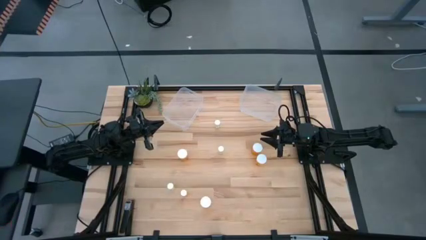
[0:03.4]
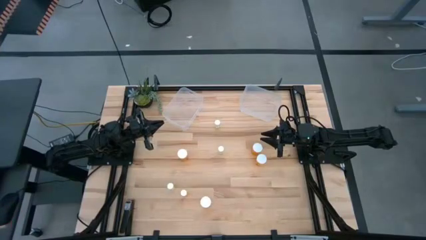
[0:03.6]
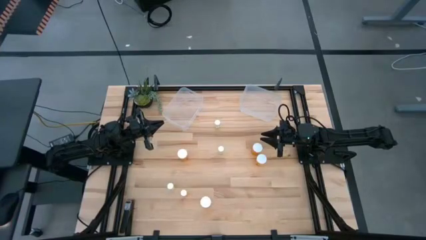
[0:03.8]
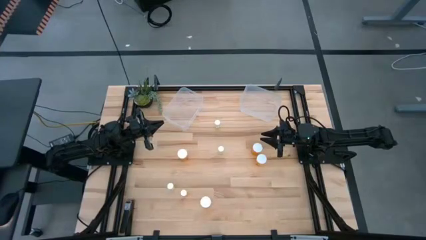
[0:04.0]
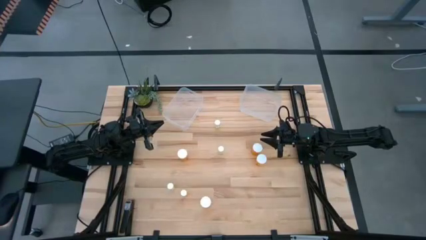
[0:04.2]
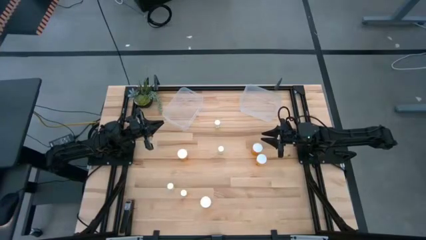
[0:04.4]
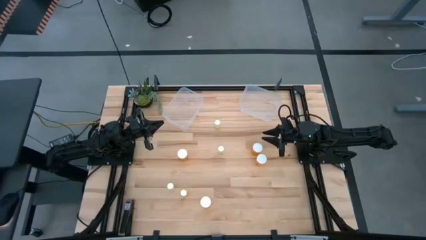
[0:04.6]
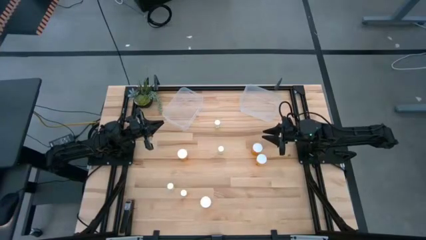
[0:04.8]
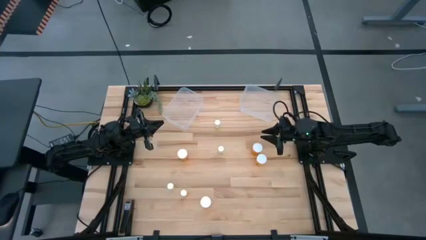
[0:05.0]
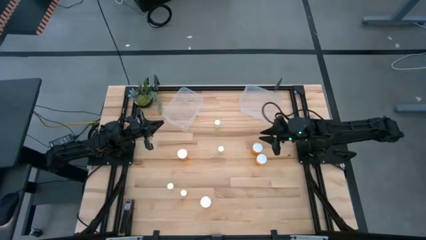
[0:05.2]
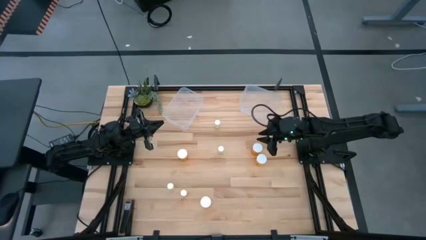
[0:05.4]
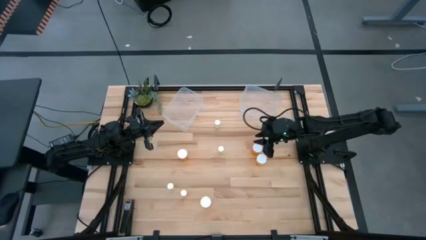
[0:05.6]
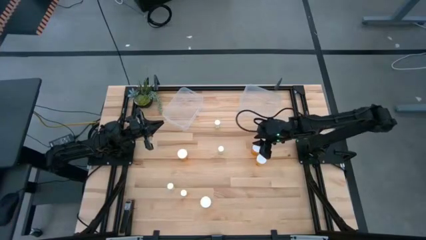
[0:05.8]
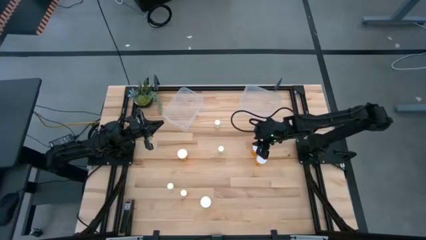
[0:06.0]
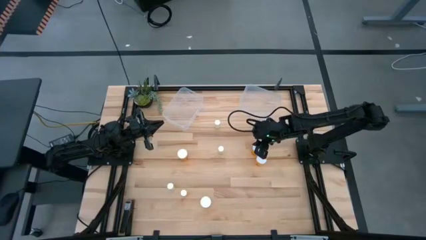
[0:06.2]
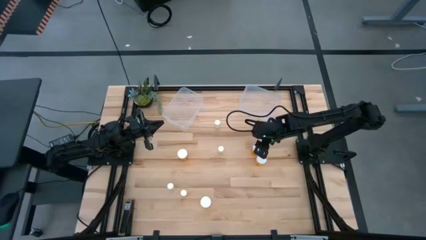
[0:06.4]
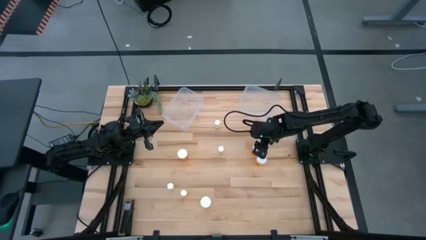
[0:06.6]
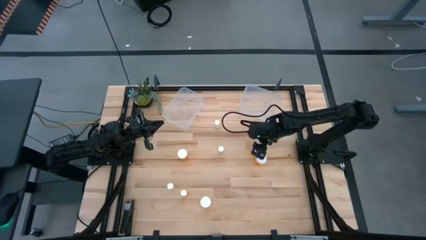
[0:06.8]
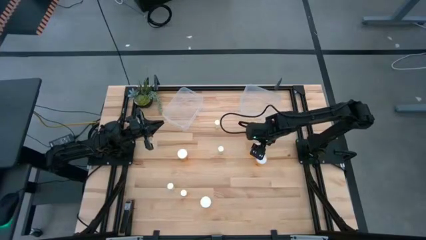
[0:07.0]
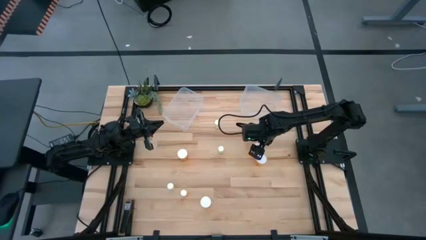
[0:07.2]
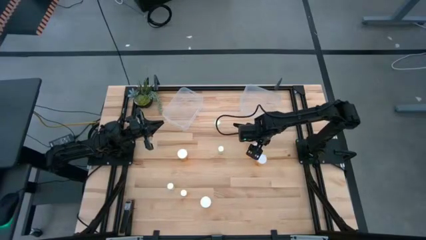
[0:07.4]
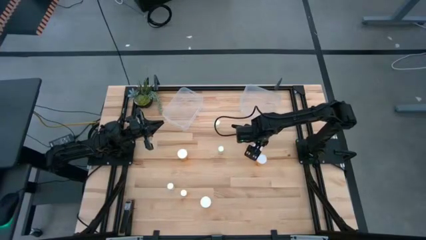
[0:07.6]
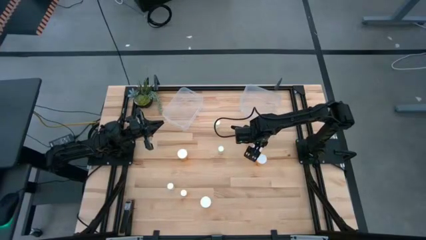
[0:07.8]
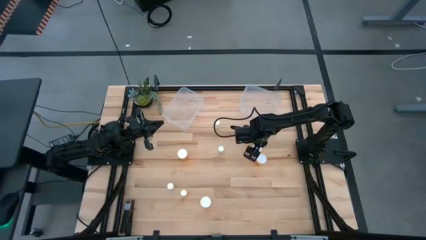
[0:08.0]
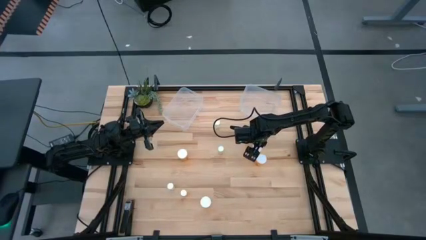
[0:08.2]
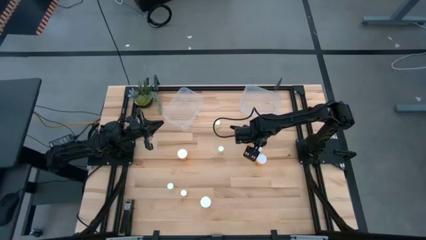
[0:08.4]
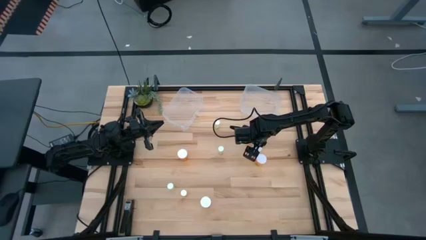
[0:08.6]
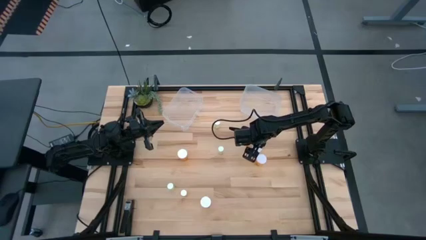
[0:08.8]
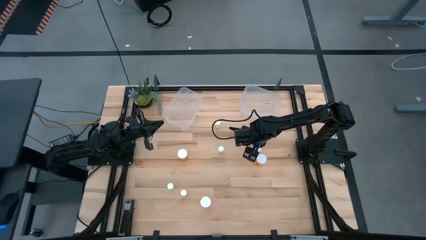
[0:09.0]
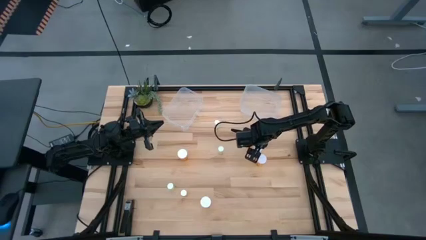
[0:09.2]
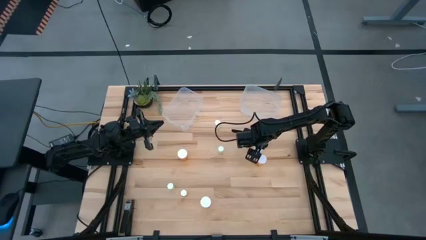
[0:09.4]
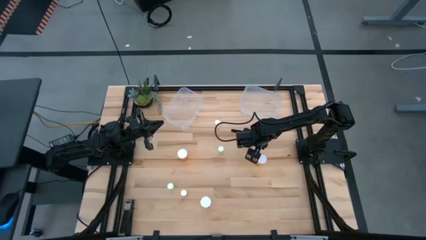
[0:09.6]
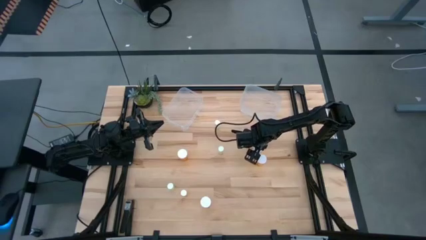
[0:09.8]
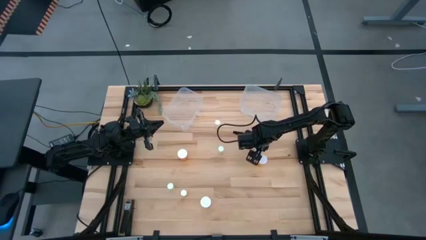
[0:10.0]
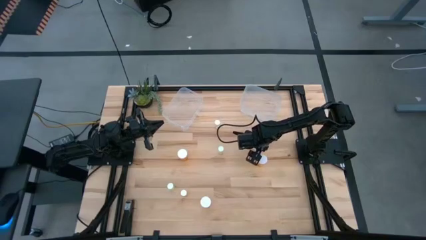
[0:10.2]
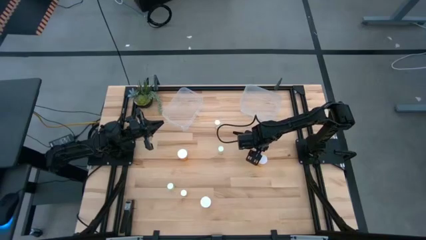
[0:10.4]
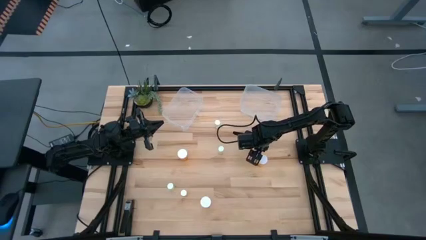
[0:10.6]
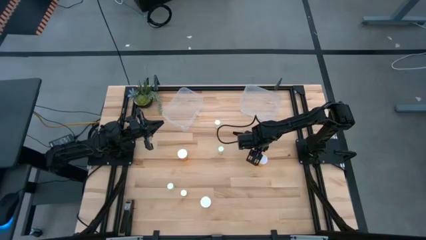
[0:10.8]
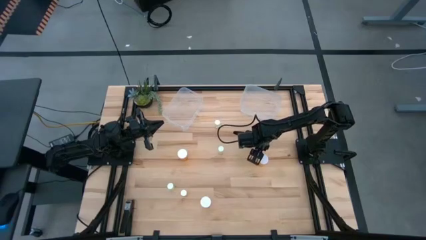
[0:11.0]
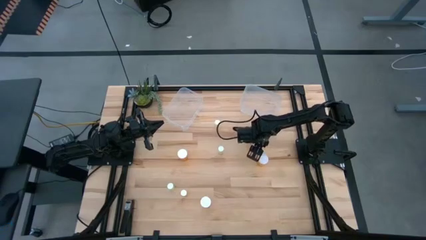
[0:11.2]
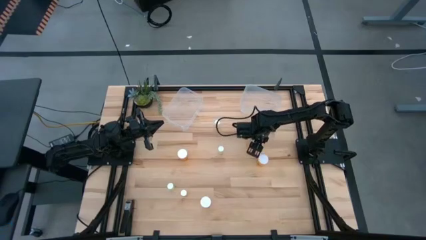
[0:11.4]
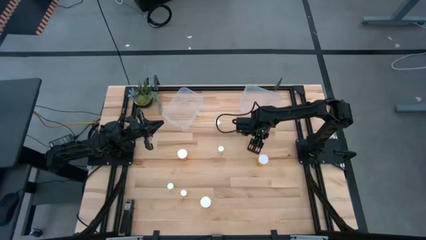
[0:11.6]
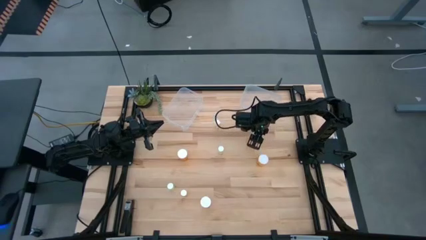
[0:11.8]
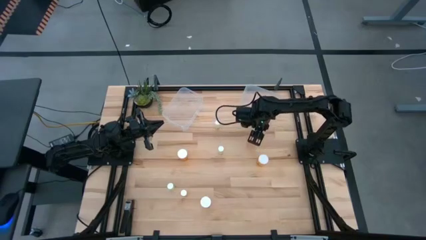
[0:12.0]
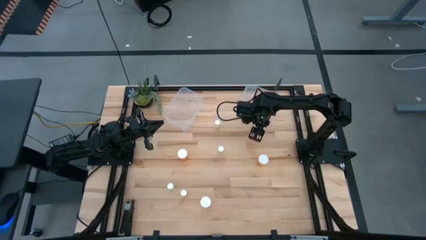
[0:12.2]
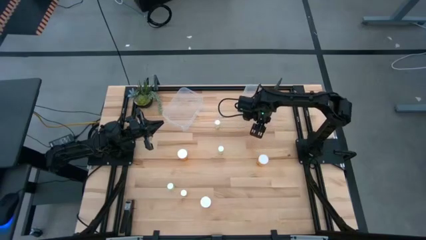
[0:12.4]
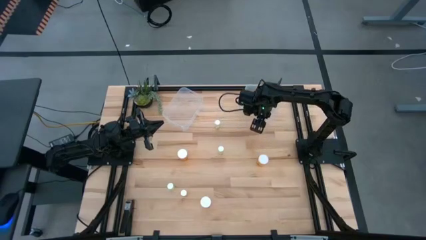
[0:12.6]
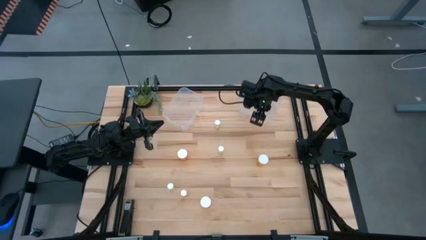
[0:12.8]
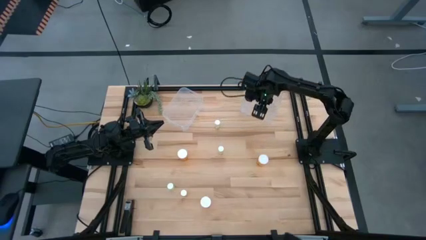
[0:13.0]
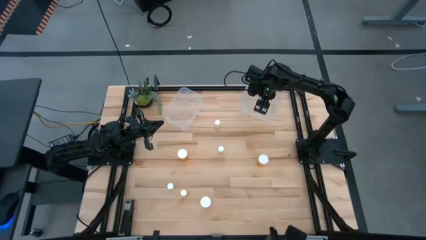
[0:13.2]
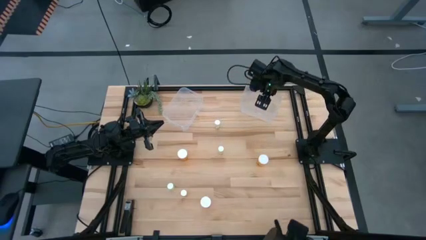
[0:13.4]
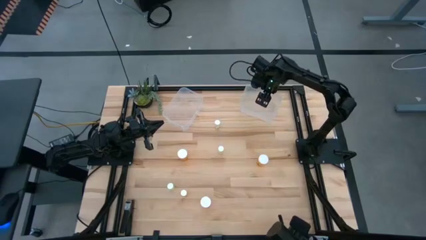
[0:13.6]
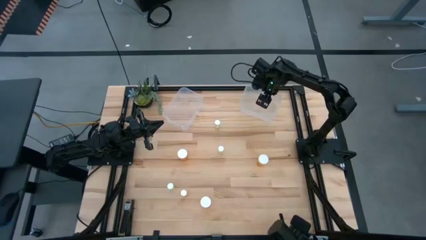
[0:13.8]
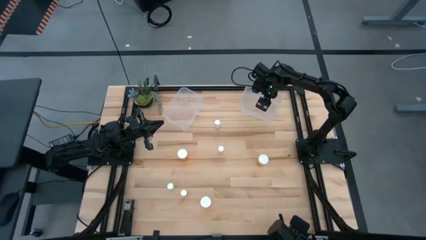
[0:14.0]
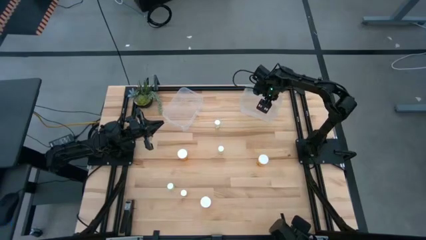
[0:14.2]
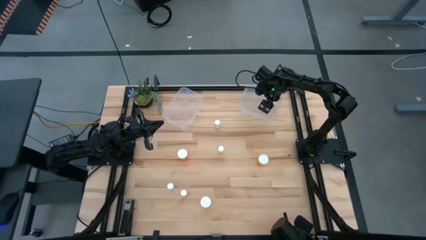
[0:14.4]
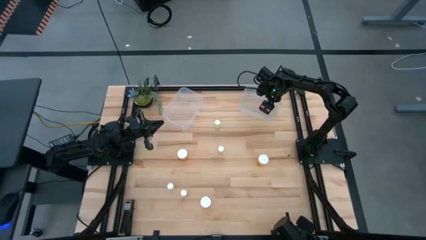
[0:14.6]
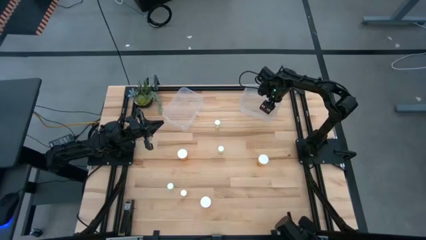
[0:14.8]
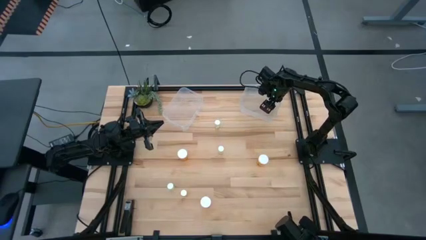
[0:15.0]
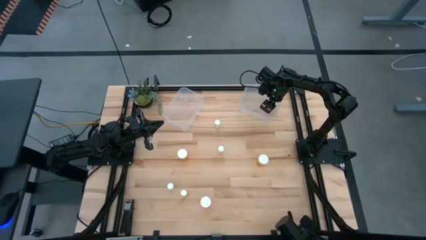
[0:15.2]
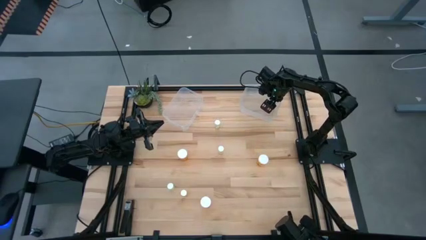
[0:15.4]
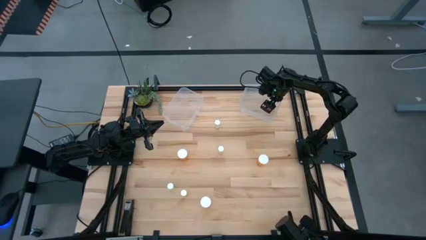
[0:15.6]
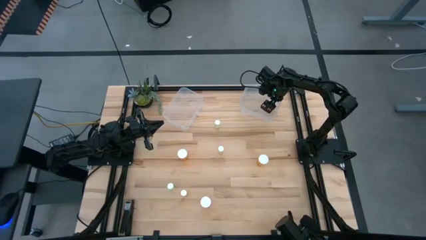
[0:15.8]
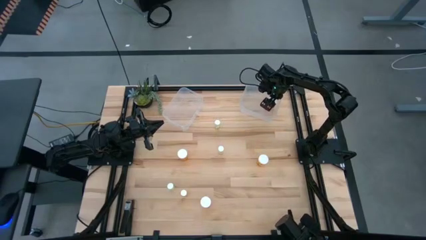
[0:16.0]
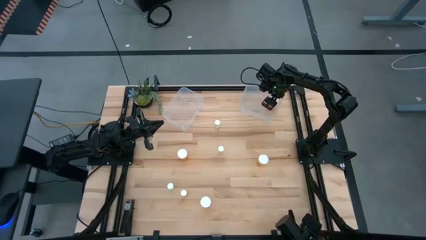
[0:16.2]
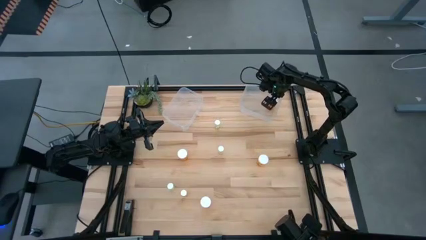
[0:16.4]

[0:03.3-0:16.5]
Task: Pick and place medicine bottles into bin by pill shape (circle, oval)
Put the large orange capsule bottle into the right transparent bin
